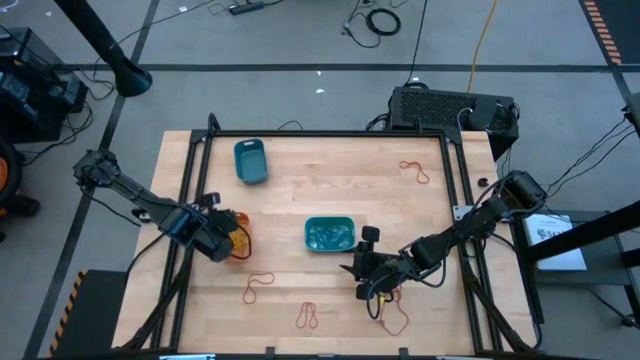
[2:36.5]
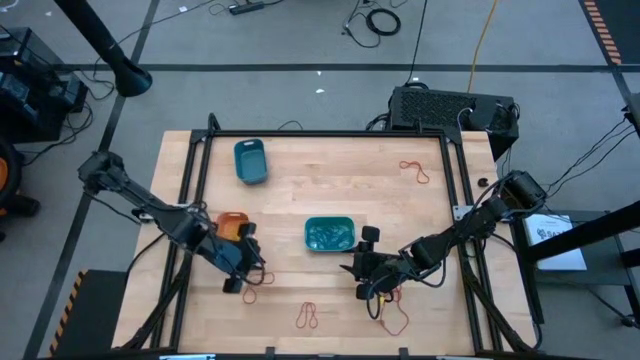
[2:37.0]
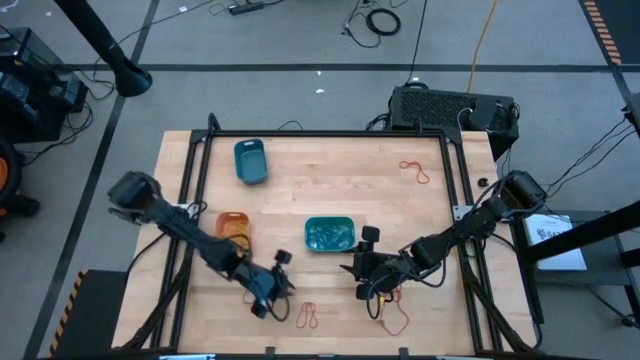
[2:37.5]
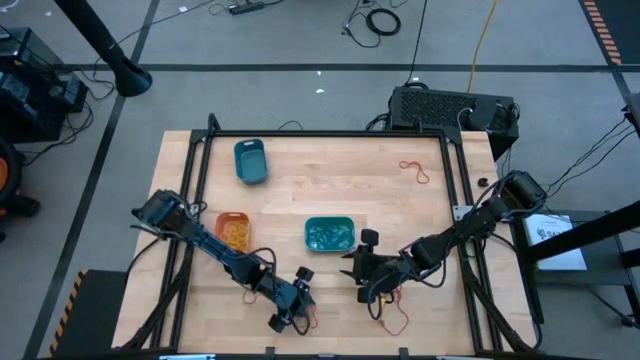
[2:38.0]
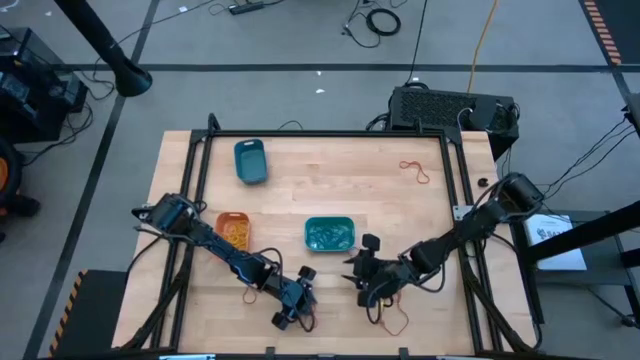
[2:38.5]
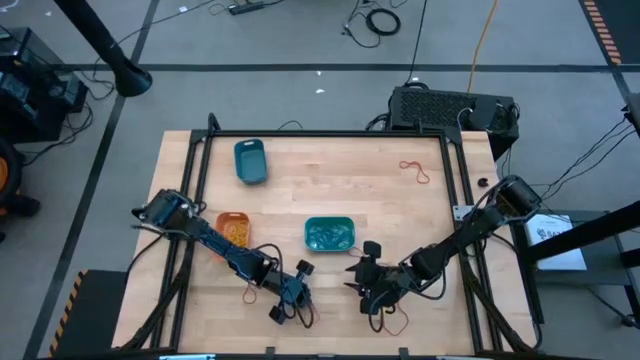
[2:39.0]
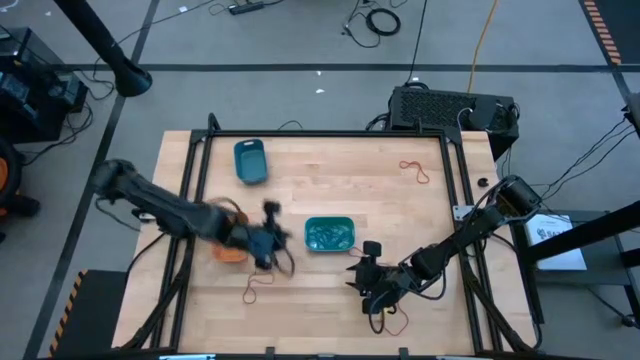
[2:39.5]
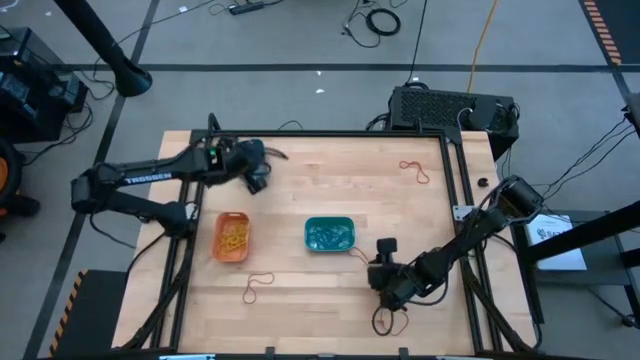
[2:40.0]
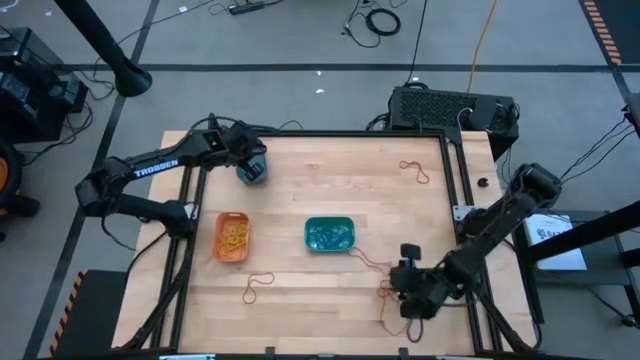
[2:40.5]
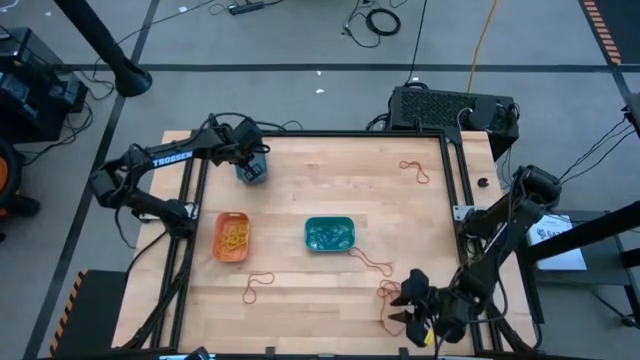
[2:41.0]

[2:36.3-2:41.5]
Task: Sort rubber bands into baskets
Put the red rubber band into the blue bin

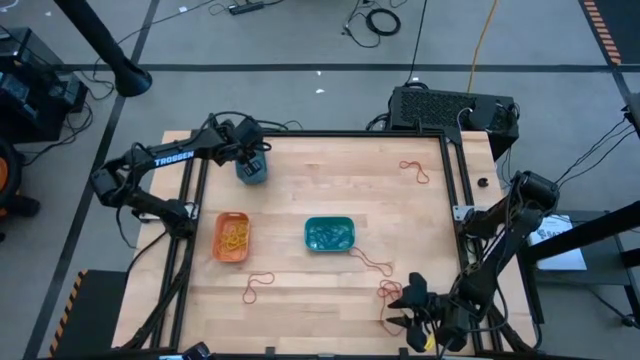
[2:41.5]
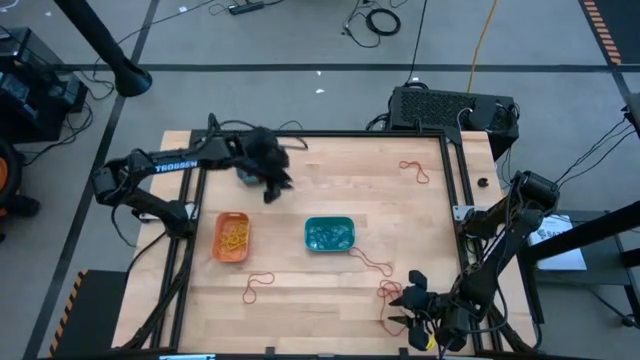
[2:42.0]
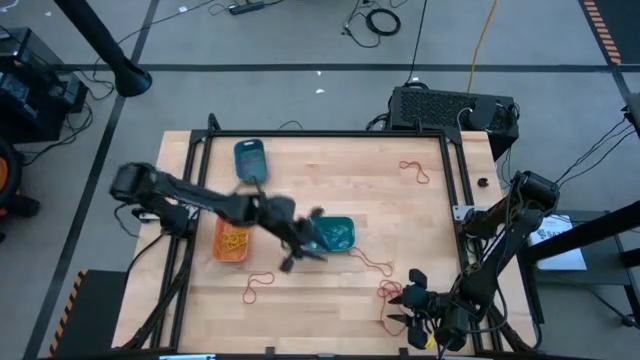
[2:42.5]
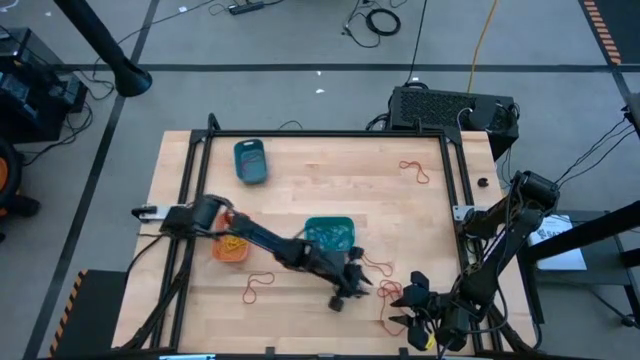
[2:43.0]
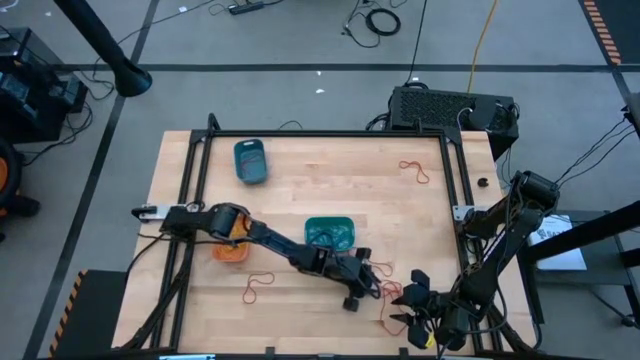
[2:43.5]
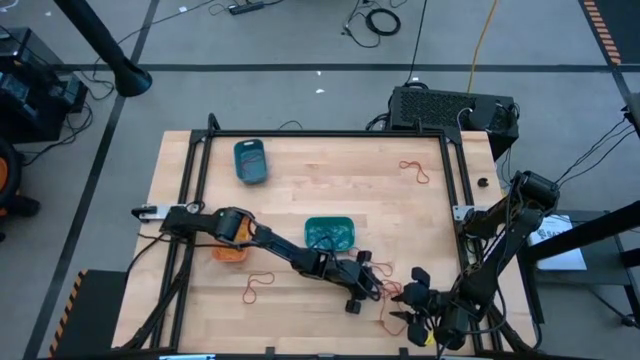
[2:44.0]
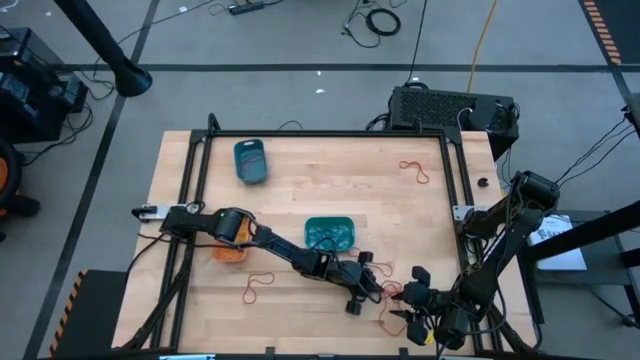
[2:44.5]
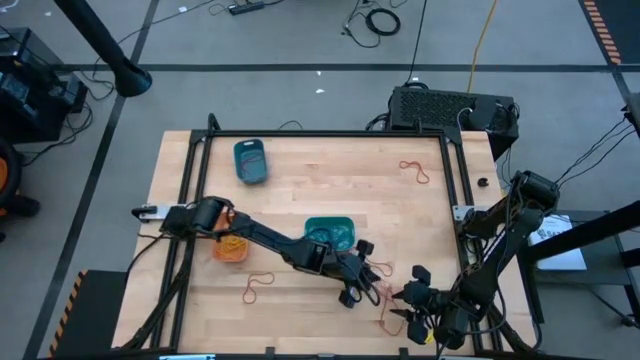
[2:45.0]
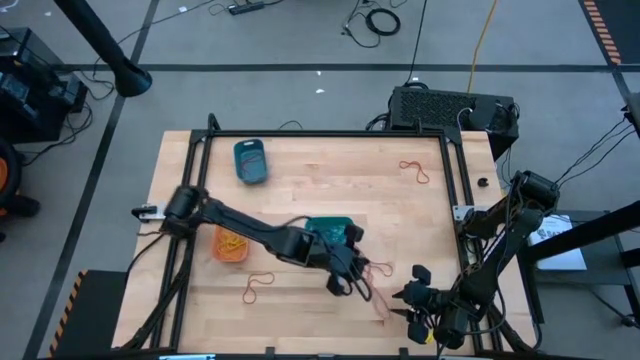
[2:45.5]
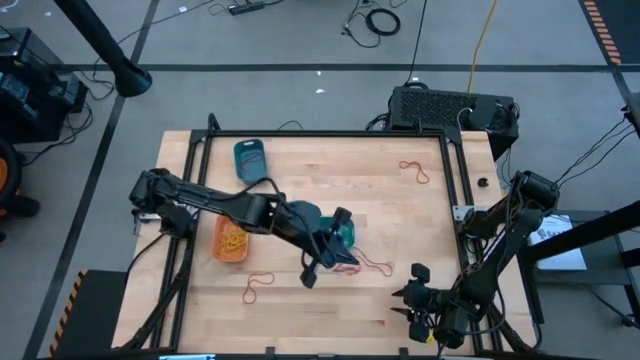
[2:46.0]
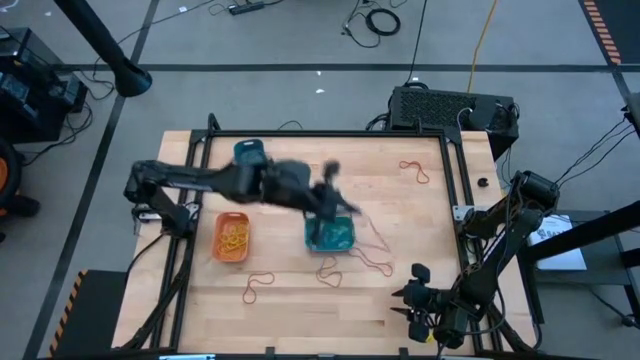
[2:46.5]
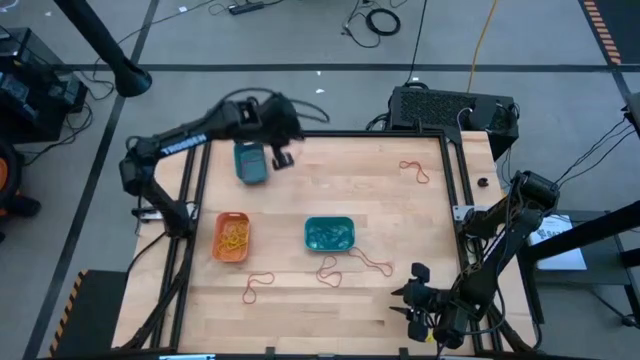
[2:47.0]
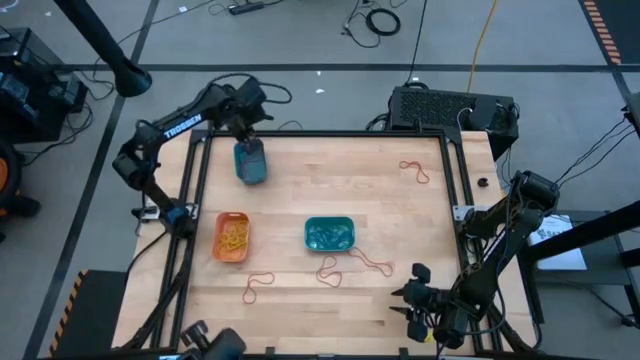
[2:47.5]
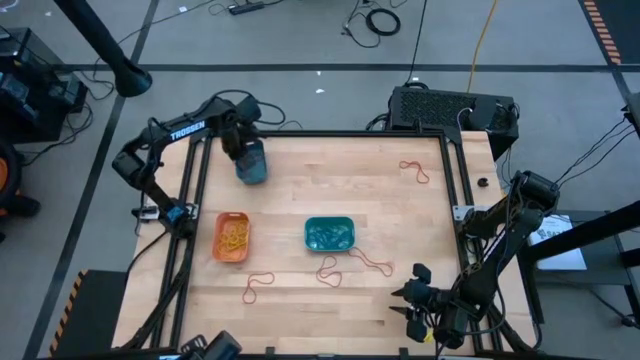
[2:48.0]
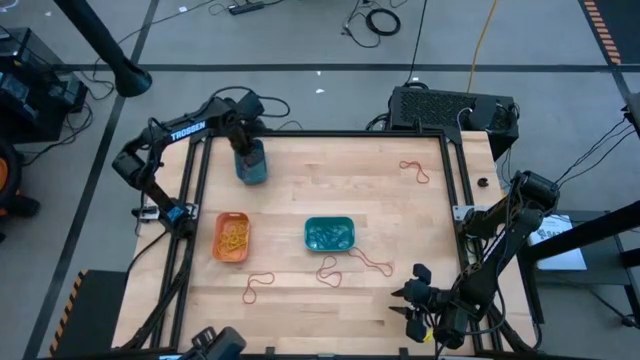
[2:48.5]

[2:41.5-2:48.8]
Put the red rubber band into the blue bin

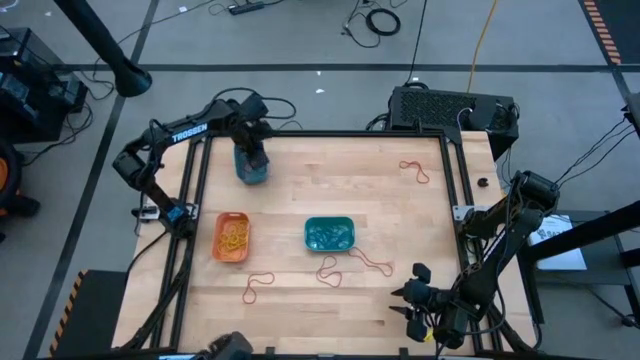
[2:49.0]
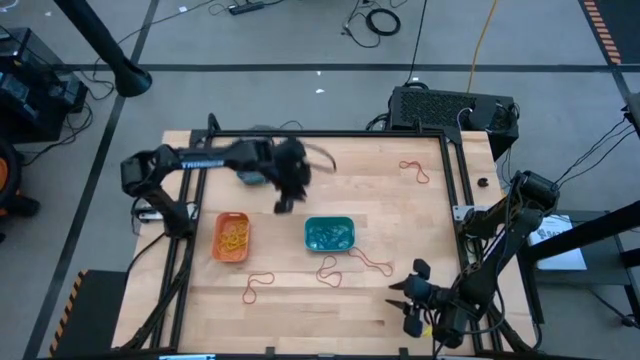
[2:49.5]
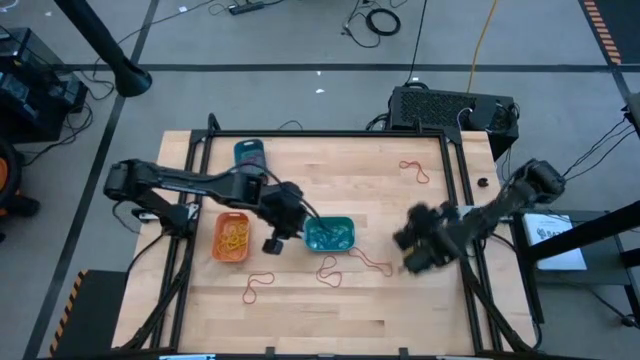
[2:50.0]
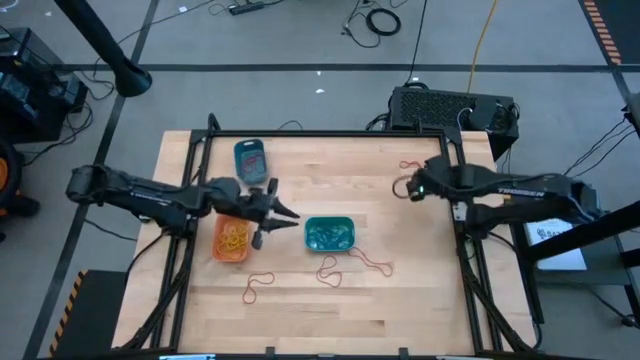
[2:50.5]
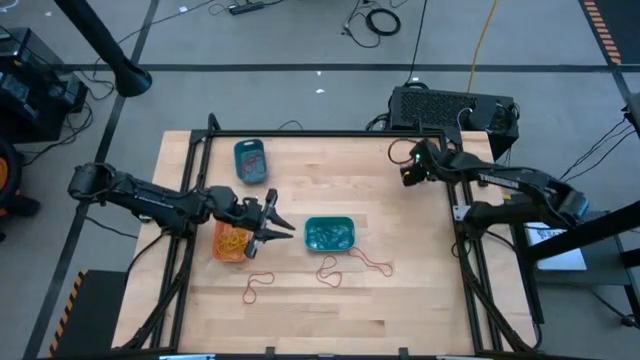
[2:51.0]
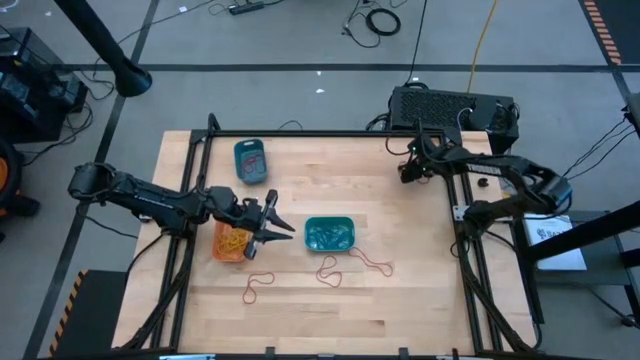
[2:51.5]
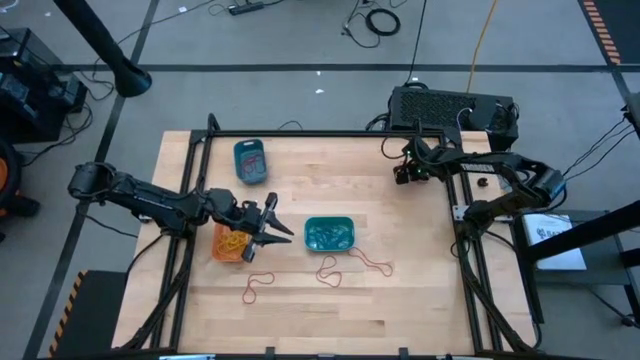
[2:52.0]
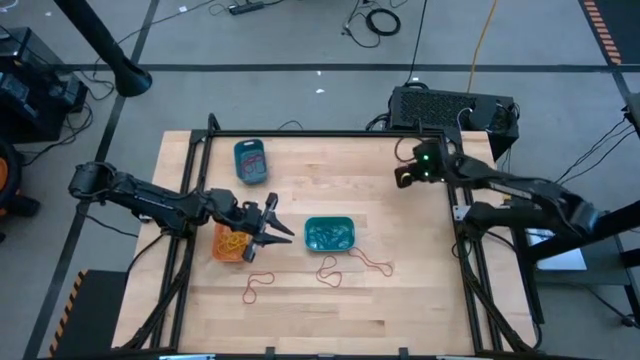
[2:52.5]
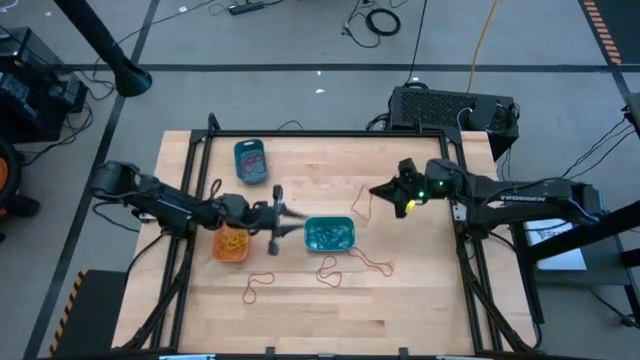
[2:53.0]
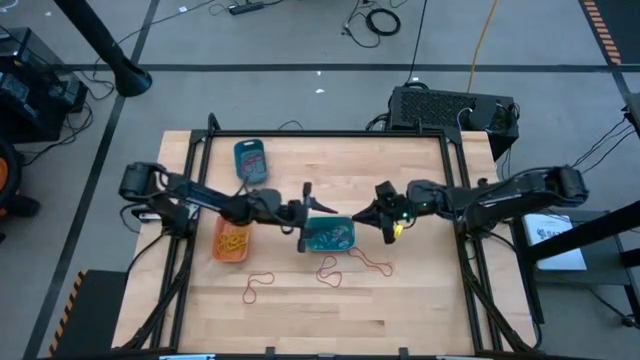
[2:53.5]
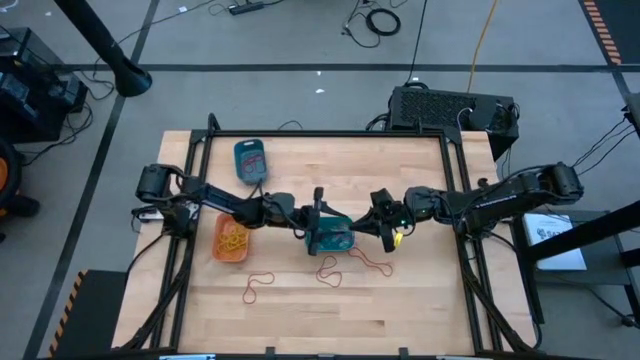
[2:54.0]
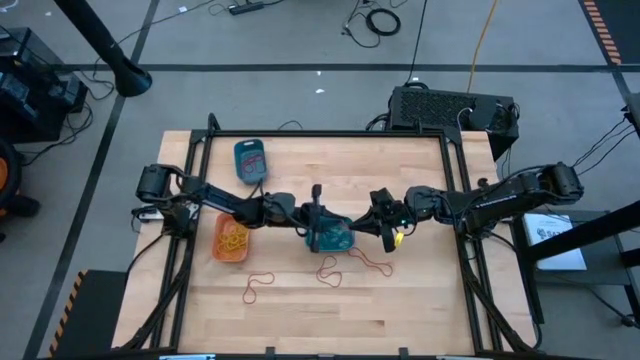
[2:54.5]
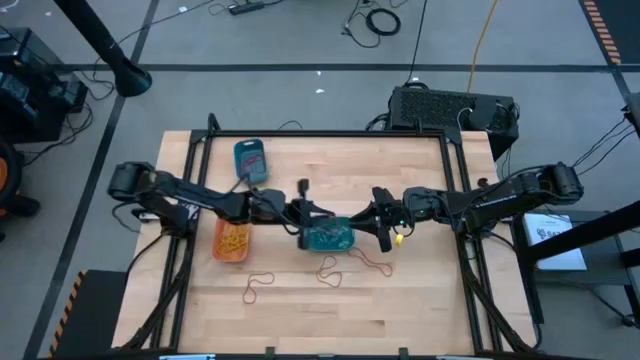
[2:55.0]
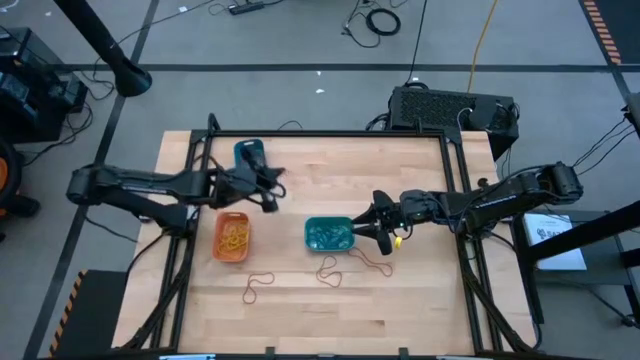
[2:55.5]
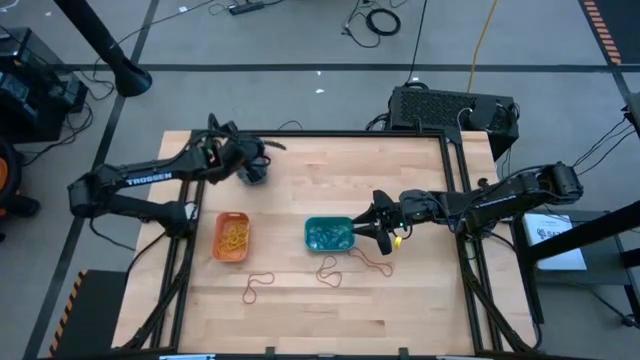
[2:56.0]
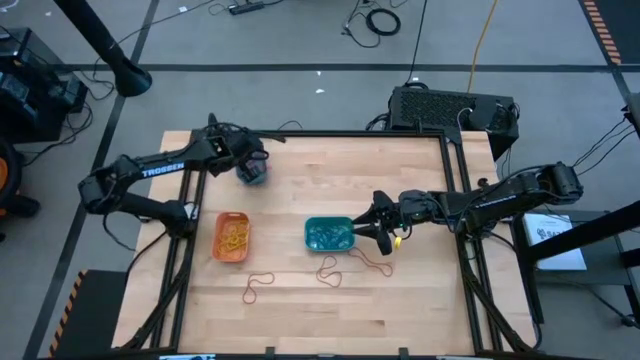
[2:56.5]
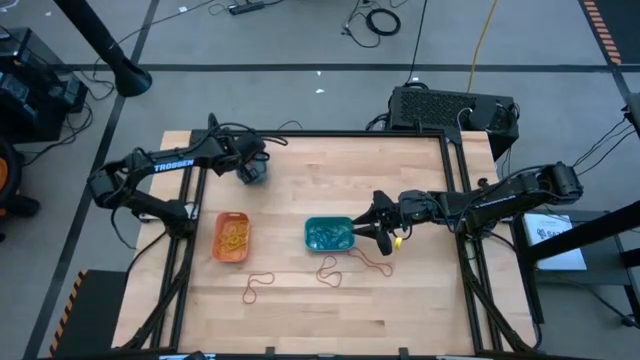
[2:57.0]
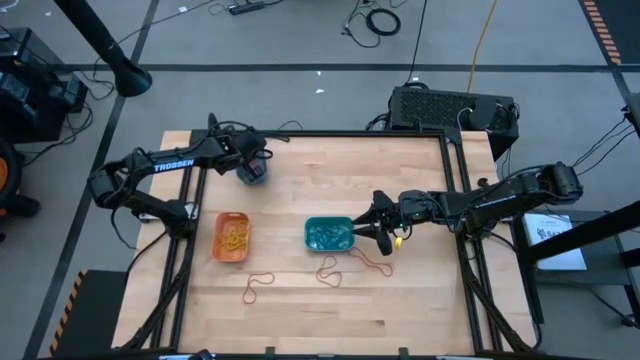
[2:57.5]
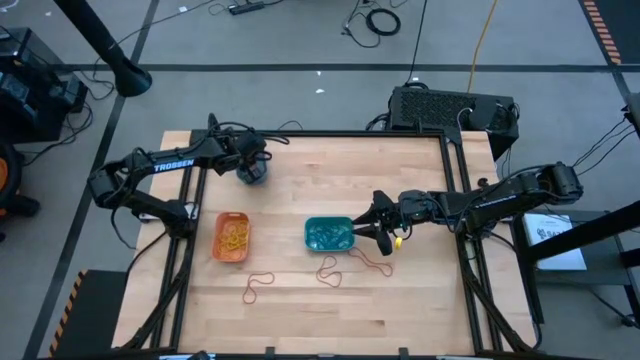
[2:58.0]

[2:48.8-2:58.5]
Put the red rubber band into the blue bin
